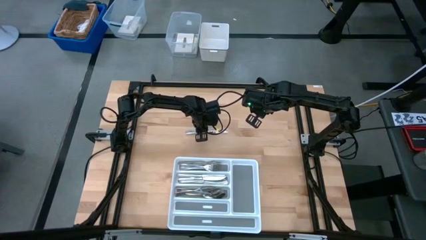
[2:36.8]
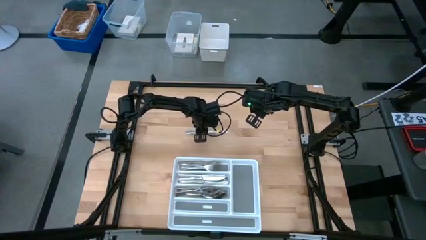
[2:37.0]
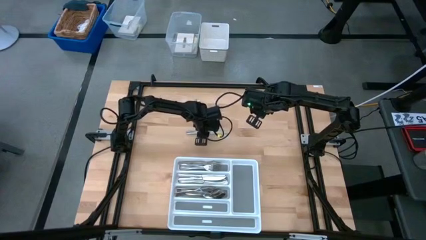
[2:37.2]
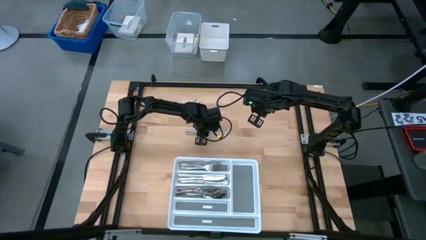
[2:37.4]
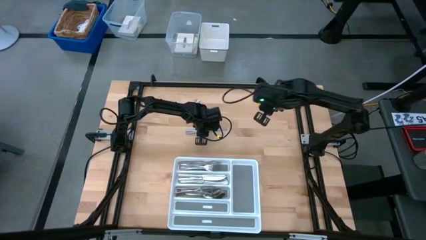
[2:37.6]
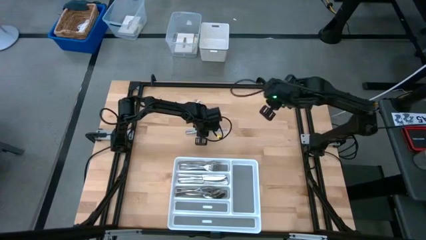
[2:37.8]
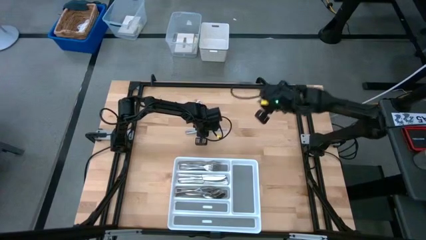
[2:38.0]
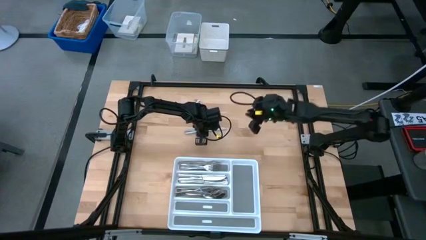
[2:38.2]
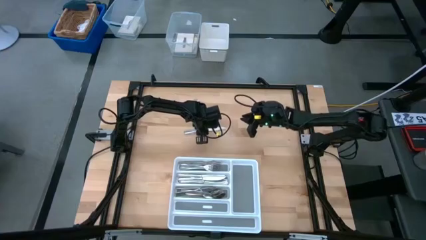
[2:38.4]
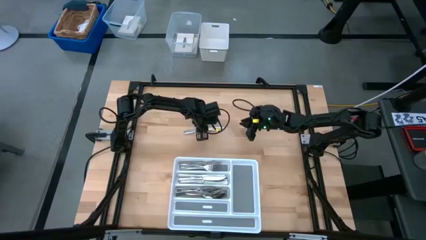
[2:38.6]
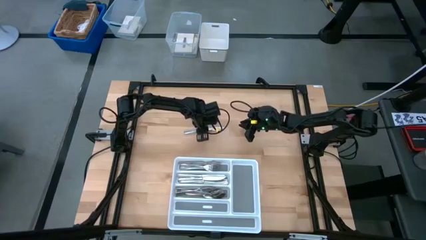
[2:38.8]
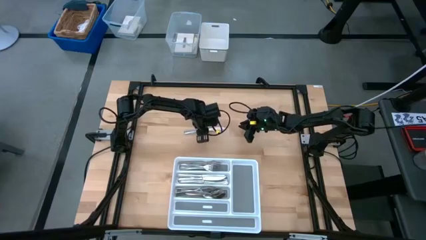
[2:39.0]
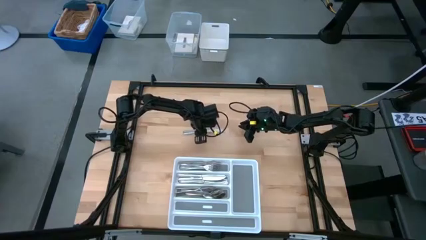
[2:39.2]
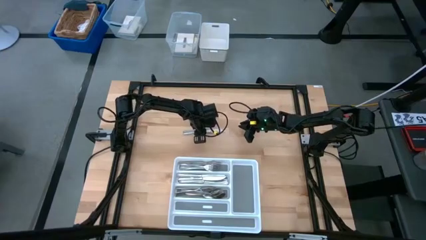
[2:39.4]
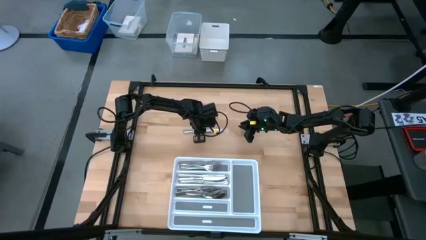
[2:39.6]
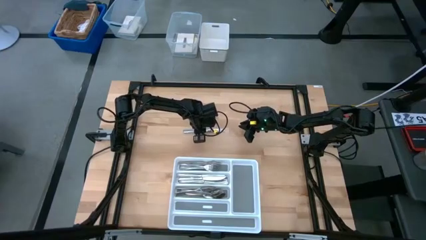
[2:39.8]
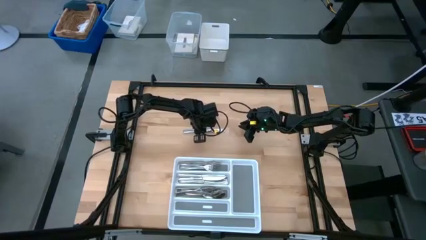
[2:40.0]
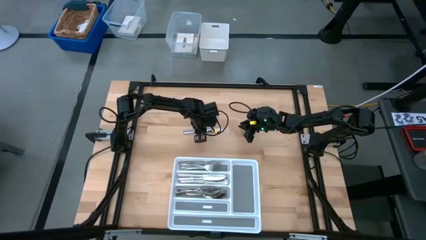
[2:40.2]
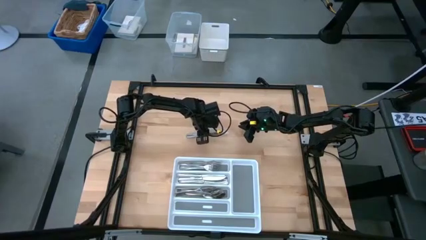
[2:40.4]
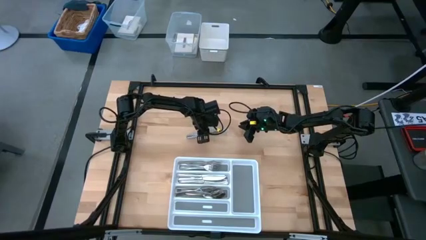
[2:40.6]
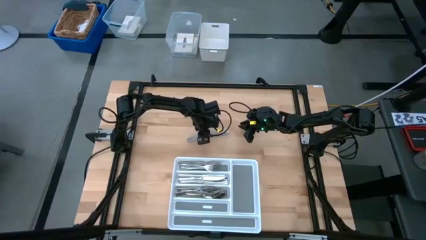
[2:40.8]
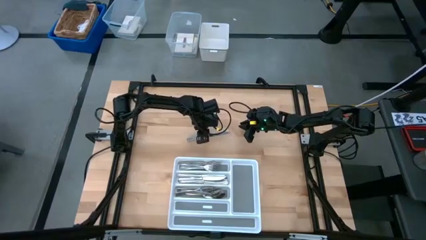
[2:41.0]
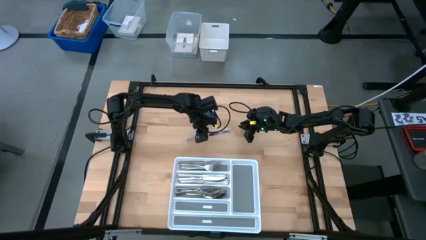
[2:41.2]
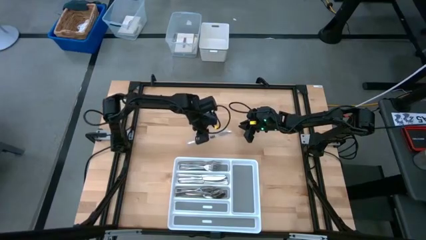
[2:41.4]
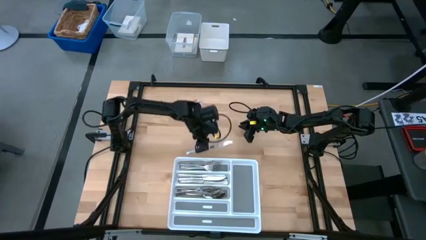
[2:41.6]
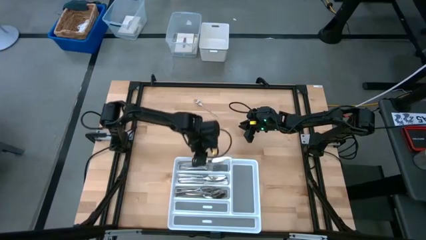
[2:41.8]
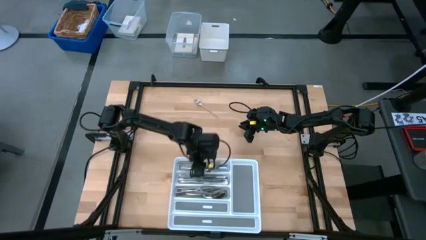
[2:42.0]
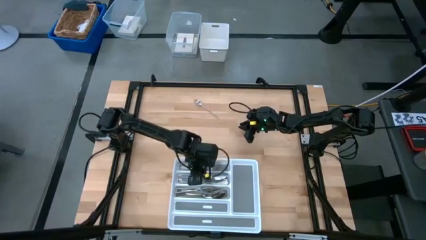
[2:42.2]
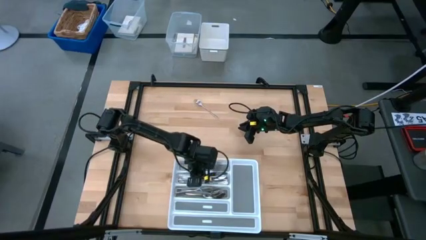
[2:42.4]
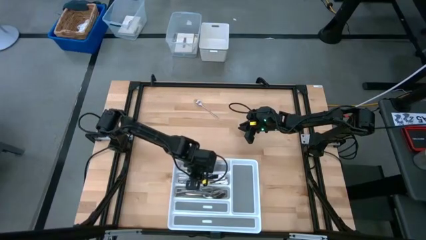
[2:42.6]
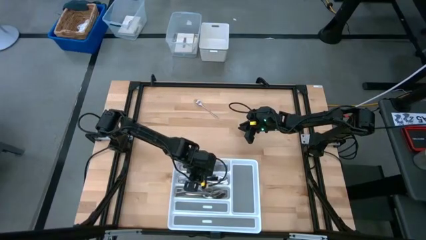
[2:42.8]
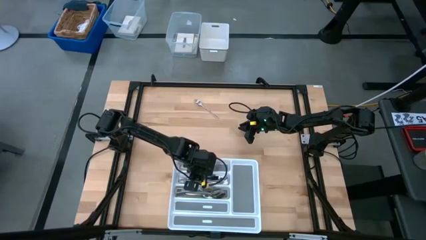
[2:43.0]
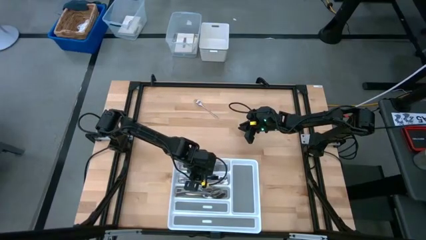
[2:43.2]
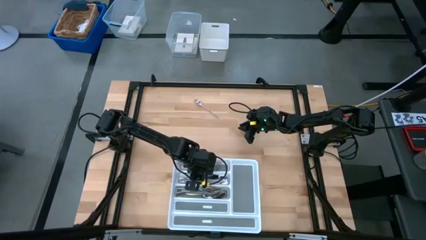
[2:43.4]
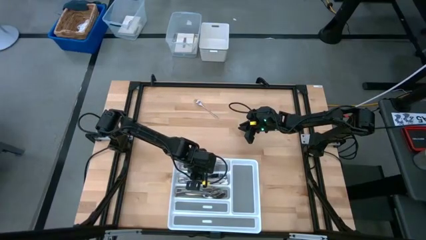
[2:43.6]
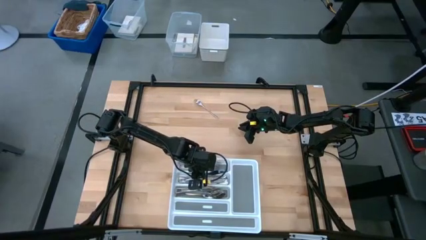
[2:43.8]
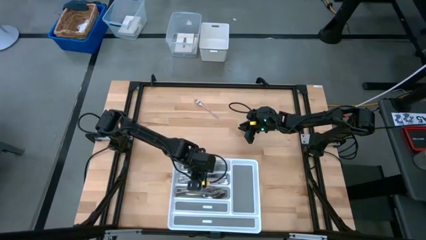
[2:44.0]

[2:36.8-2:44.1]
Task: Sort silverware
Put the silver knife into the middle section of the white silverware tray

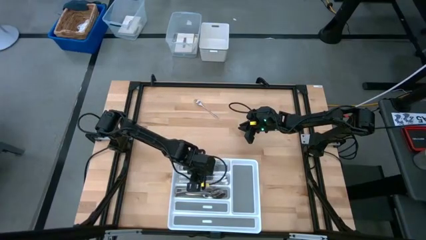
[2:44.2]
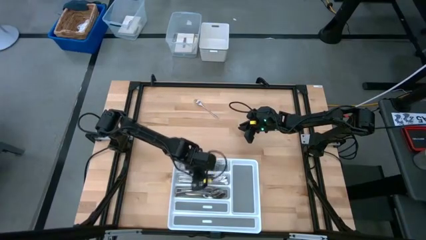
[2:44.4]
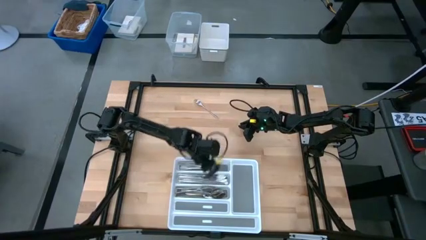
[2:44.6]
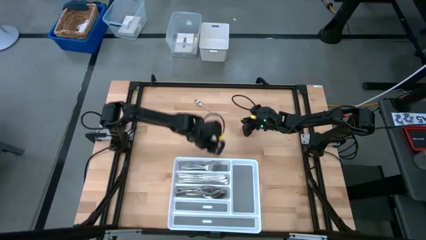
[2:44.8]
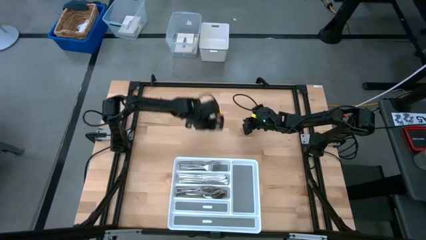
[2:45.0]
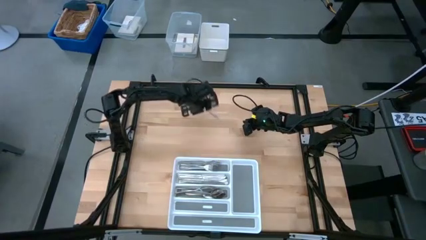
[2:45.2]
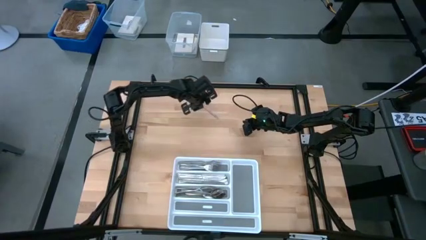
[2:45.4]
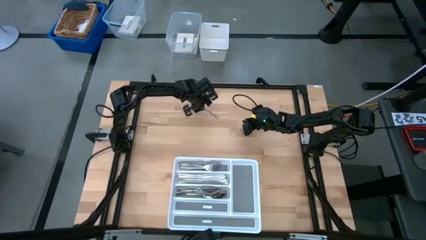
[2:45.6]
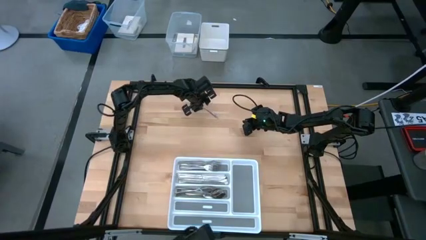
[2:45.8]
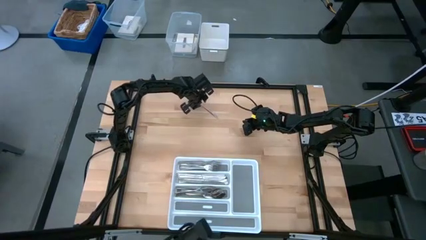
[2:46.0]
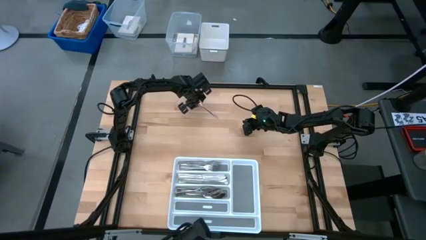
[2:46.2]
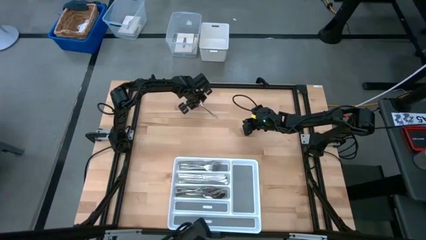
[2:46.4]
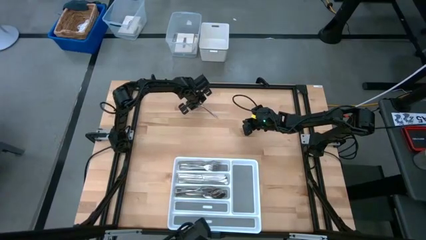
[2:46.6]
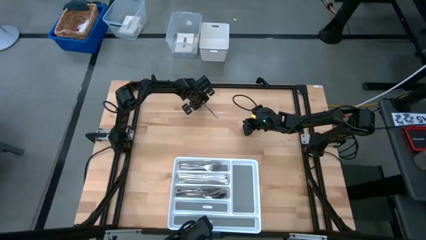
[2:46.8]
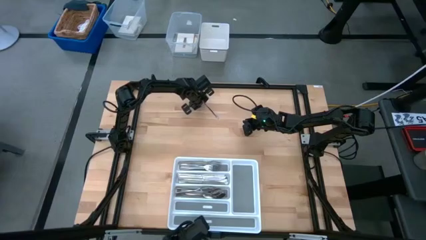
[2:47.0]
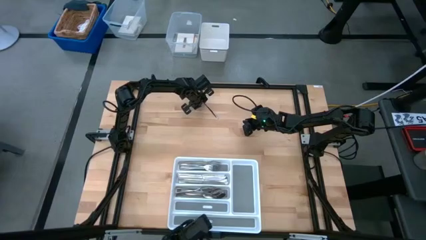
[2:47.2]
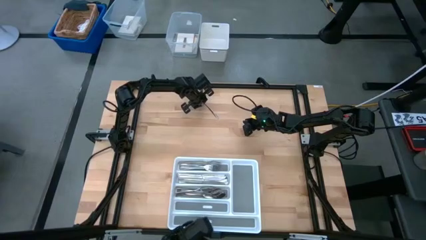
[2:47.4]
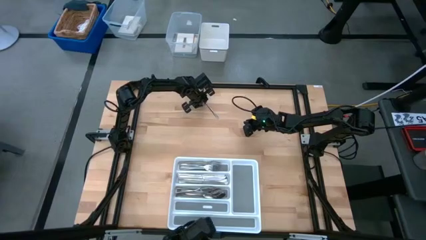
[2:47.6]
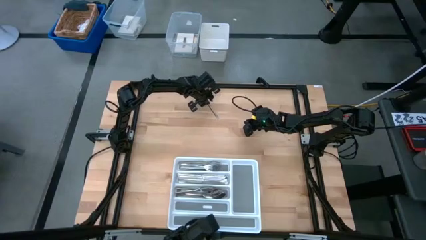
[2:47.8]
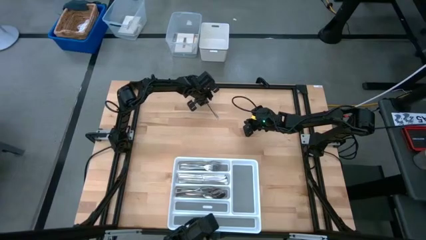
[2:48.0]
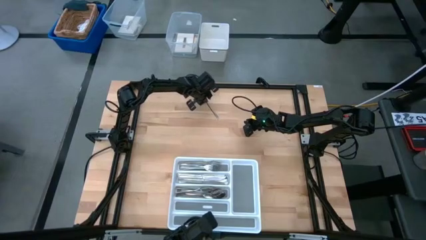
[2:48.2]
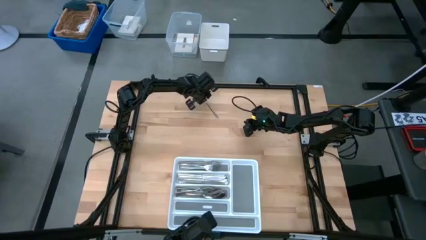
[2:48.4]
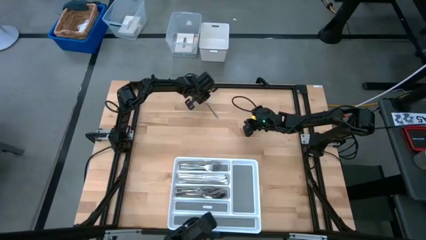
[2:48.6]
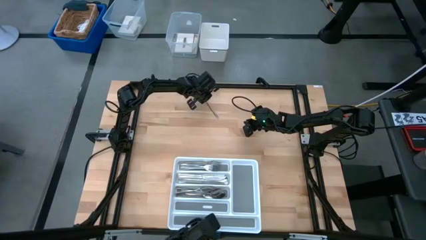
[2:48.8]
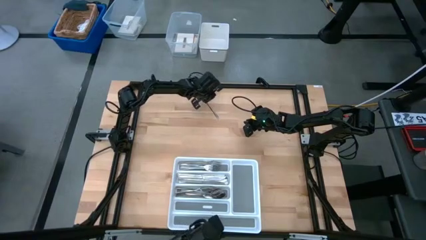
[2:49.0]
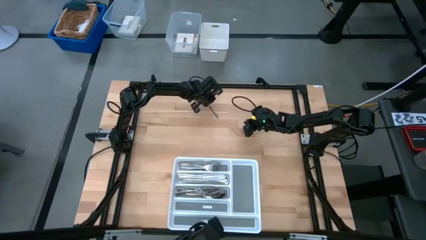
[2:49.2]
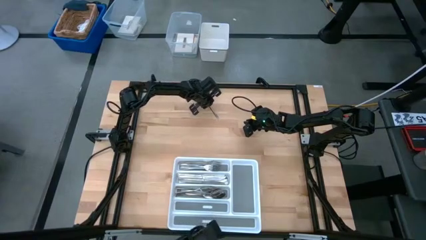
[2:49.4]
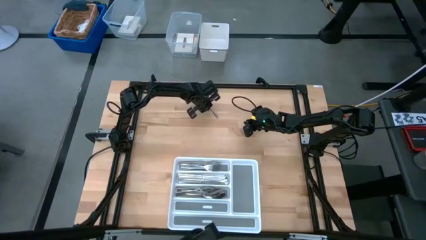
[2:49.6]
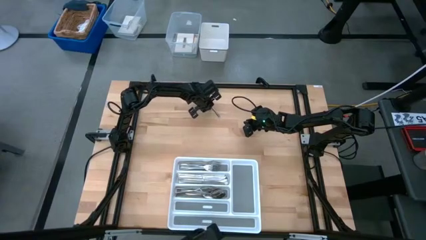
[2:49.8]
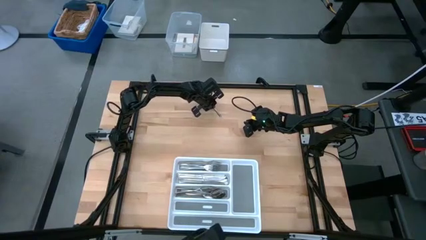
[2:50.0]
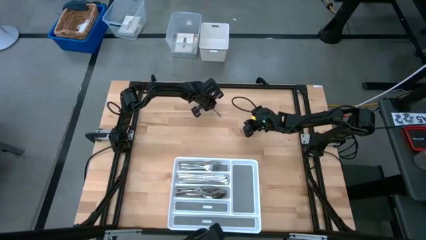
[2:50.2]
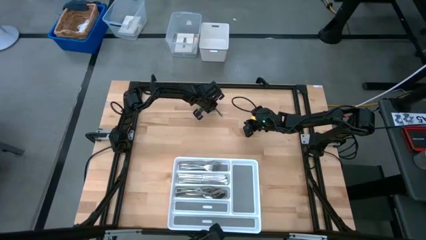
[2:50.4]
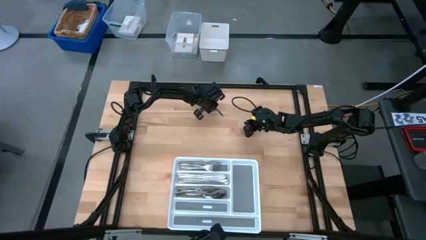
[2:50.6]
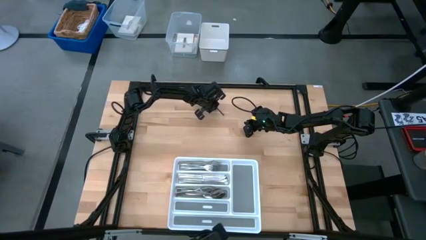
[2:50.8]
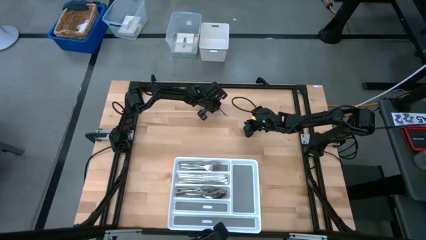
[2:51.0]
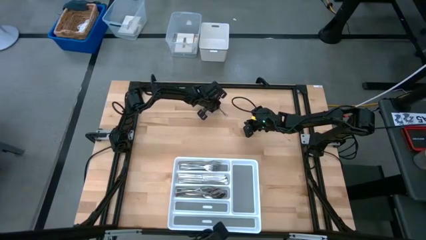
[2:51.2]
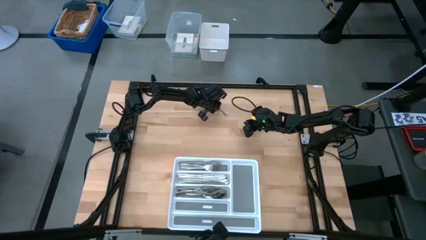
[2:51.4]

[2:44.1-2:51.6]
Put the silver fork into the top section of the white silverware tray

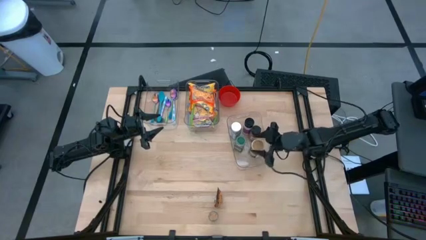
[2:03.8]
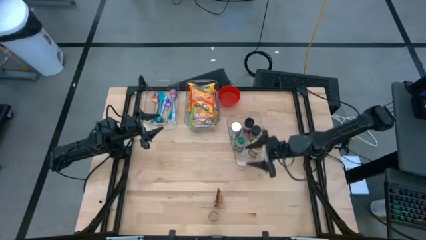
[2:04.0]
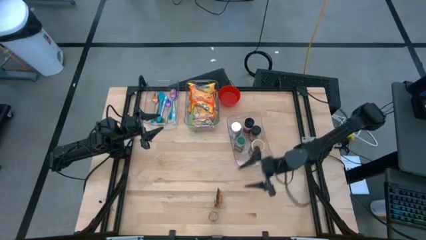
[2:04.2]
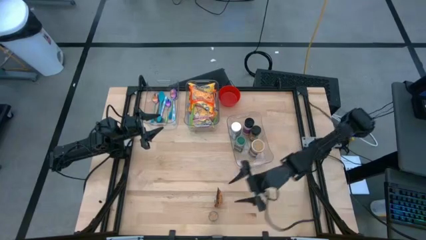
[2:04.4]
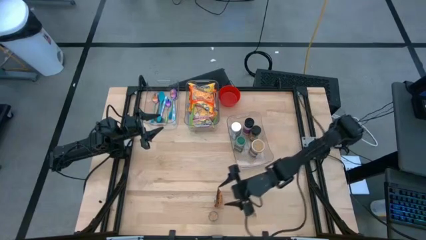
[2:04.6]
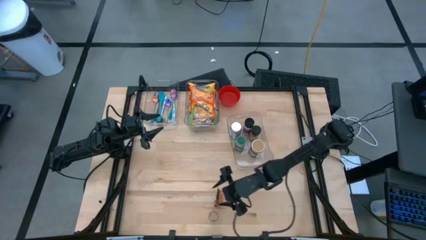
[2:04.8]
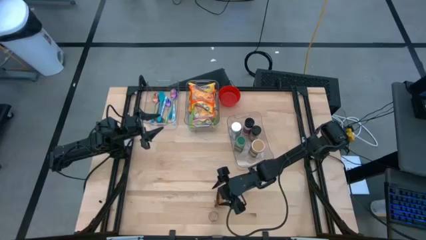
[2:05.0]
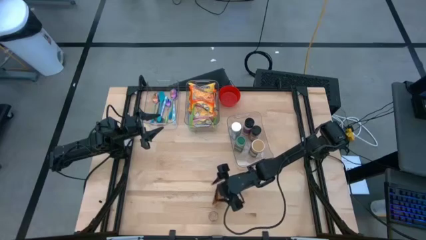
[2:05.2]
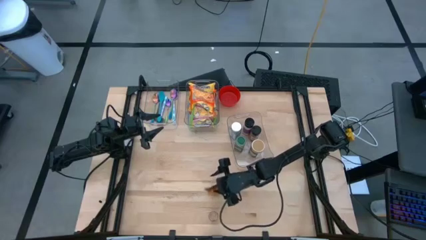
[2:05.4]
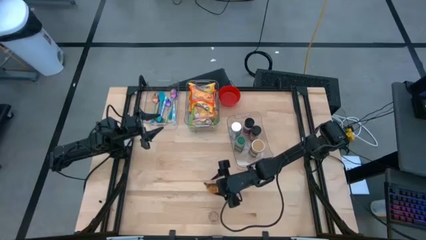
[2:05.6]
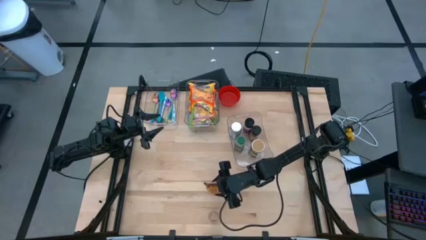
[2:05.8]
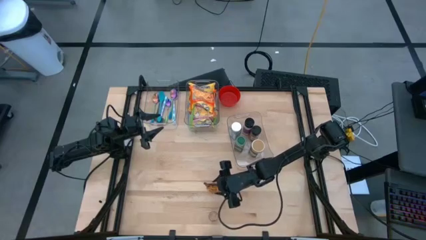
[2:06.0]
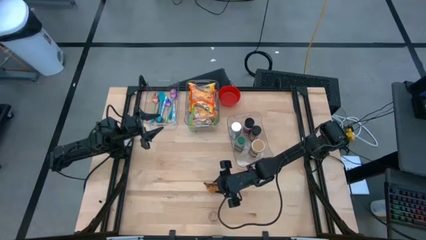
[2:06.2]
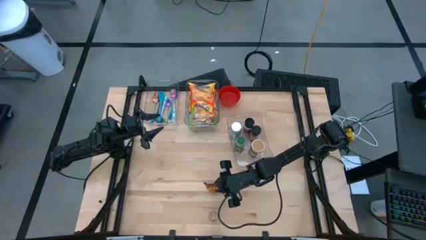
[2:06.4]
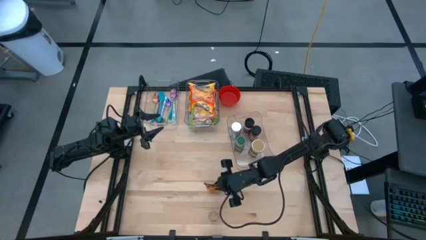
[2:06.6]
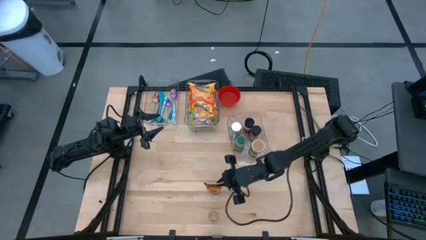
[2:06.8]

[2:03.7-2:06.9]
Task: Pick & Place Food Item
Put the orange seasoning pack into the bottom right transparent bin
